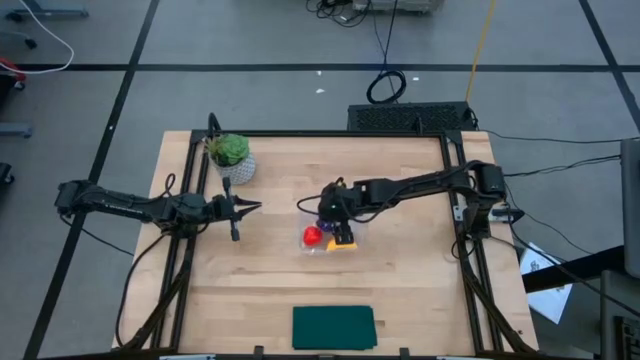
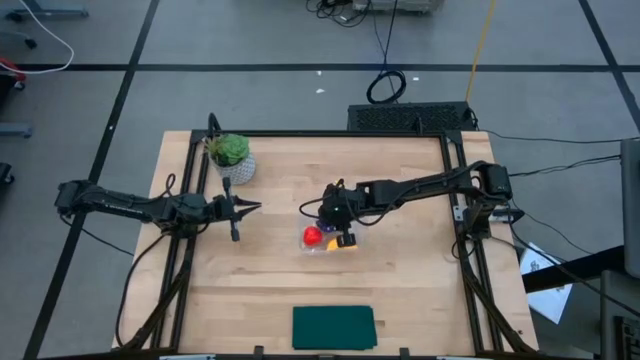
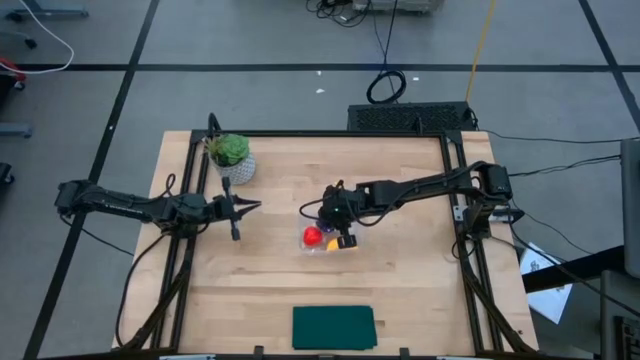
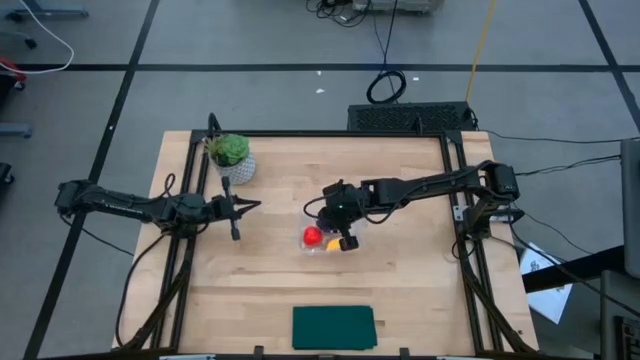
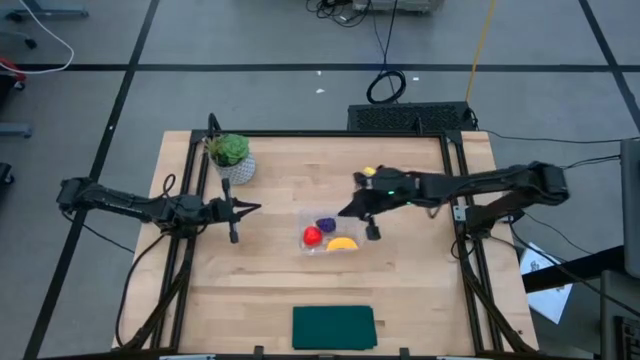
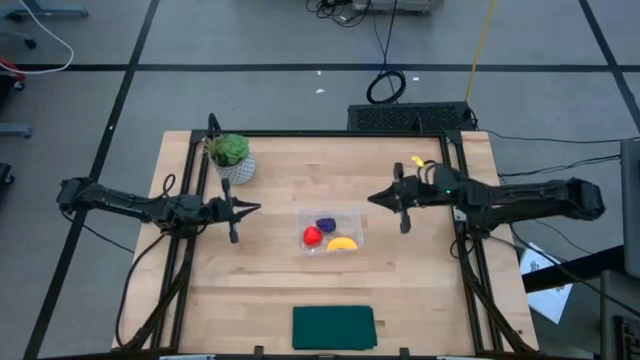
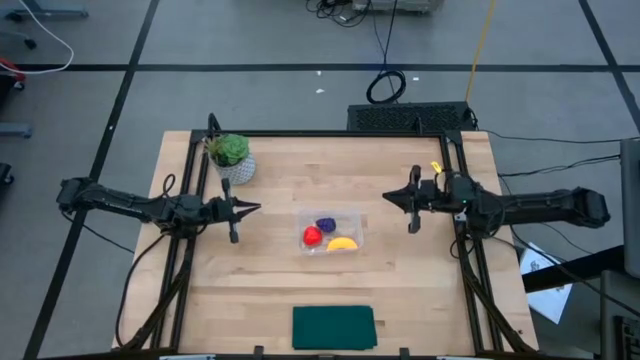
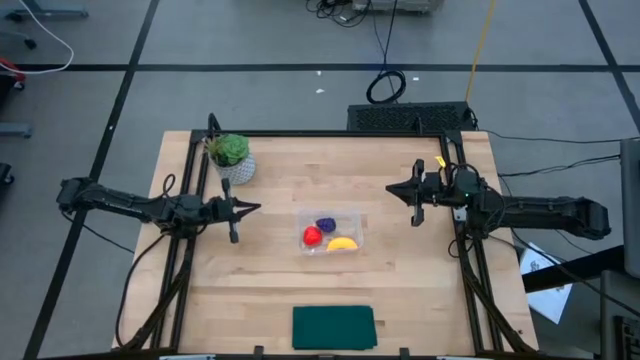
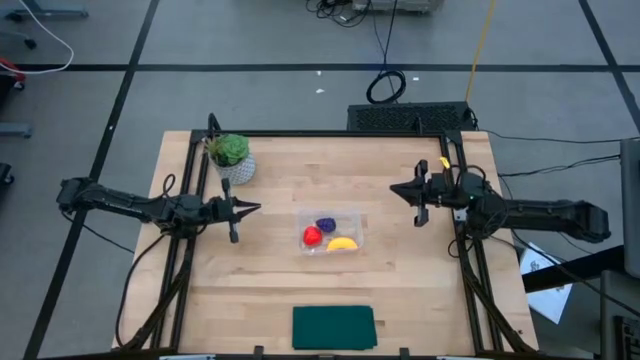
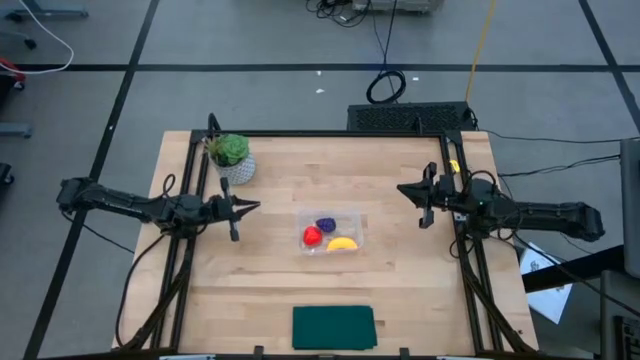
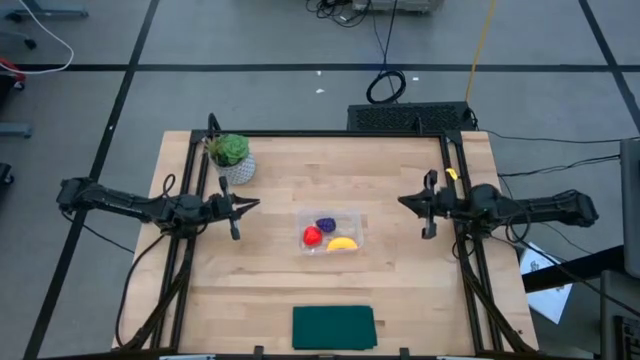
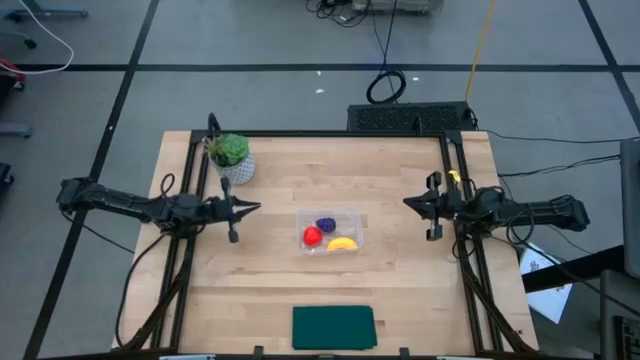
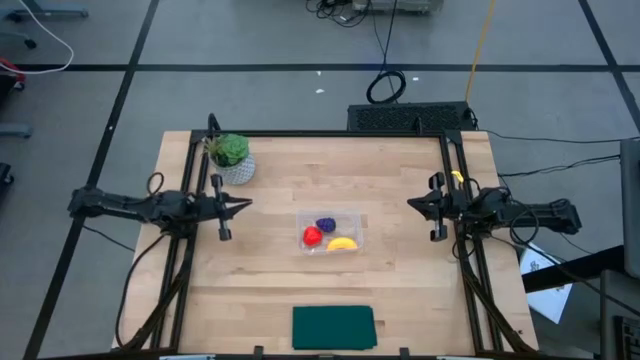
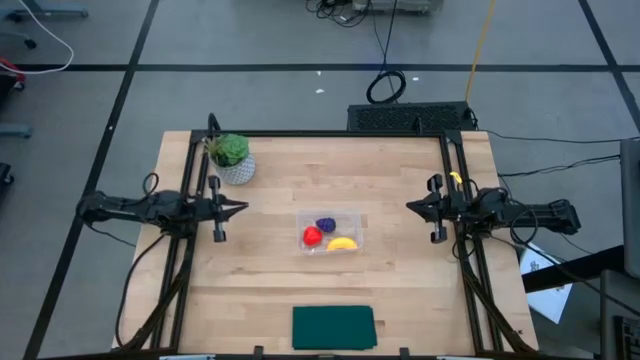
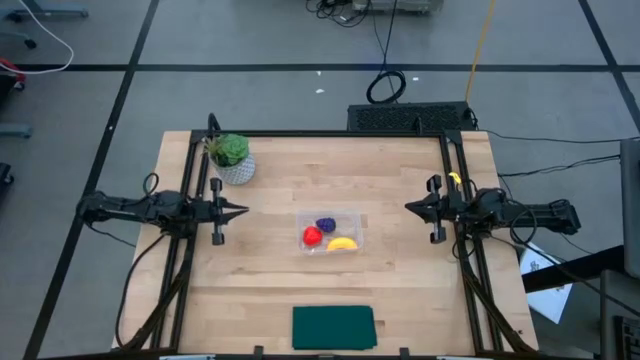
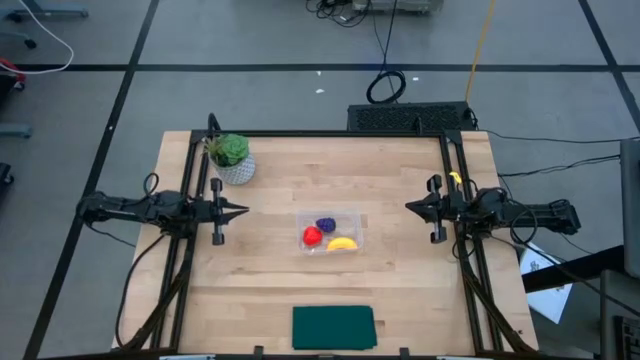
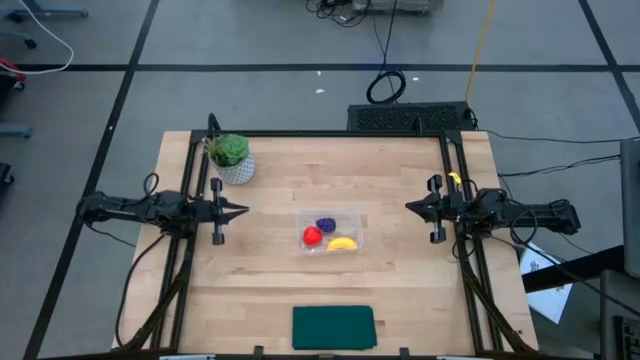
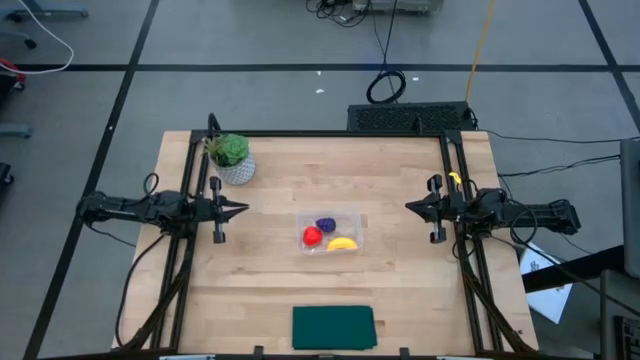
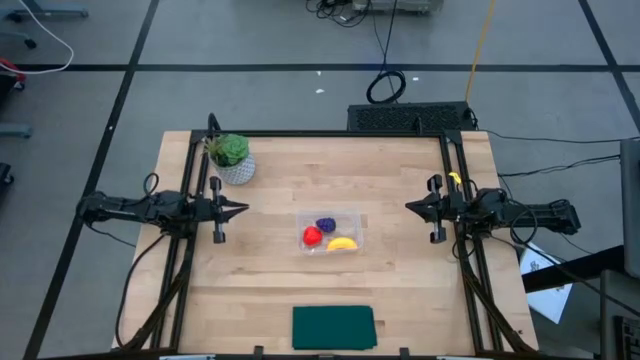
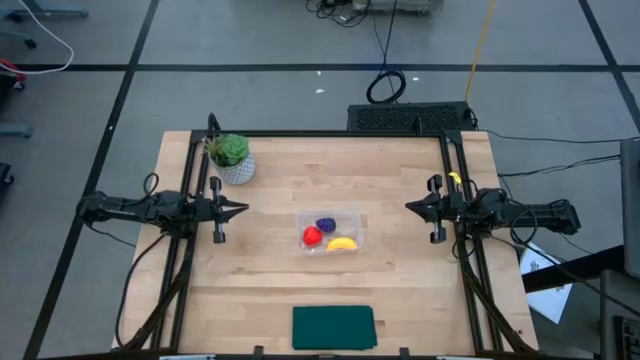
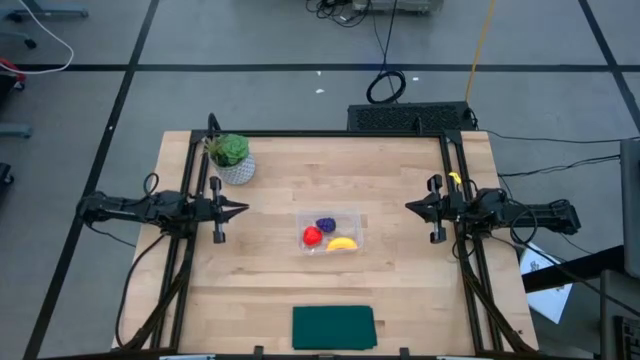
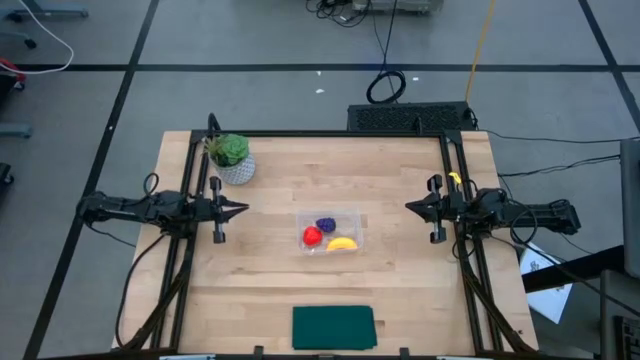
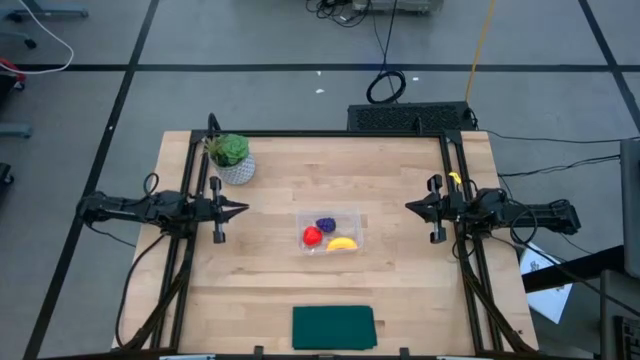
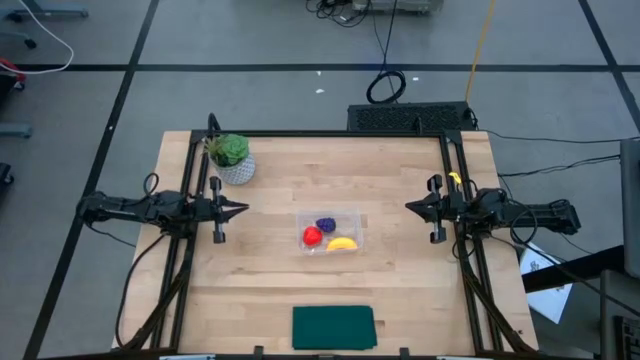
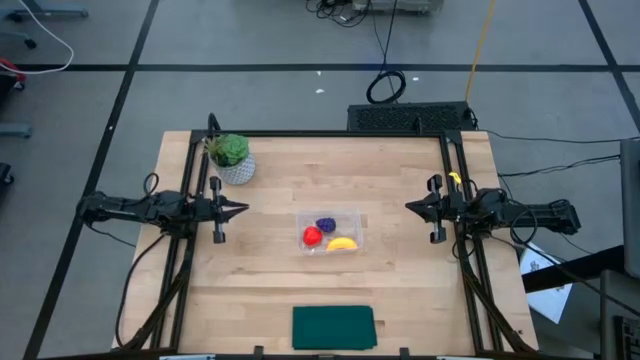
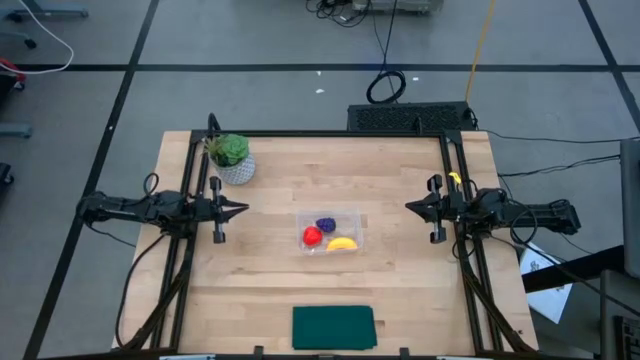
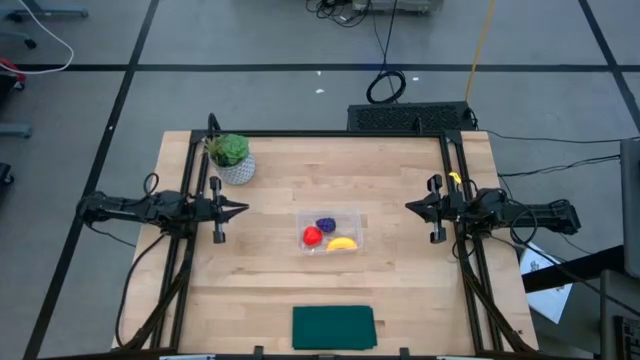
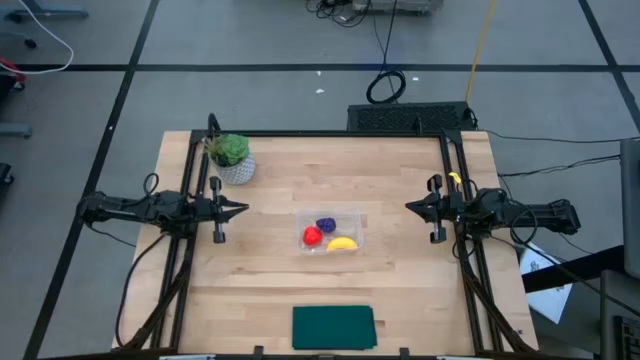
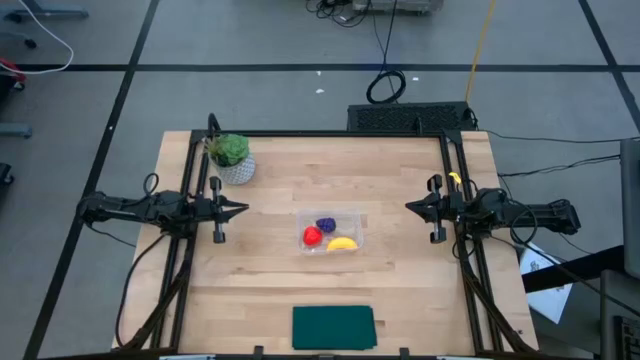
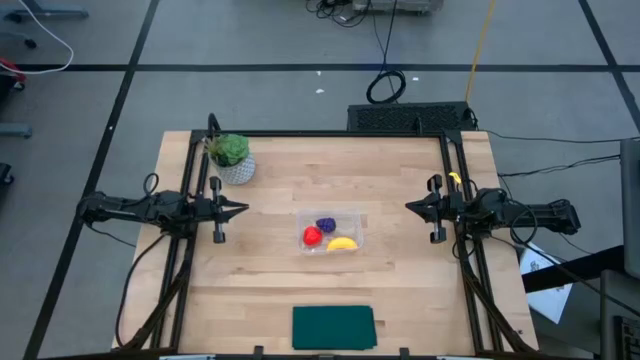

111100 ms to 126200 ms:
Task: Pick and placing Produce into tupperware
Return to Home Position
